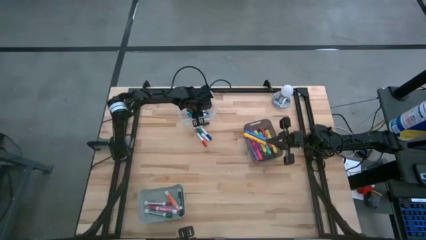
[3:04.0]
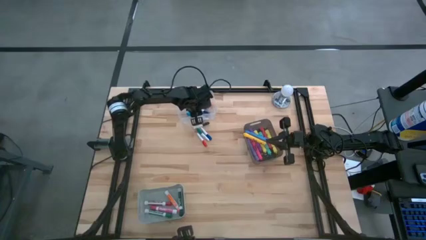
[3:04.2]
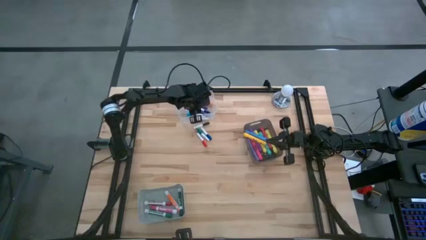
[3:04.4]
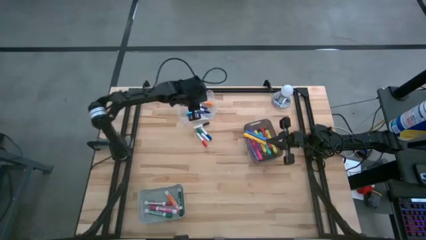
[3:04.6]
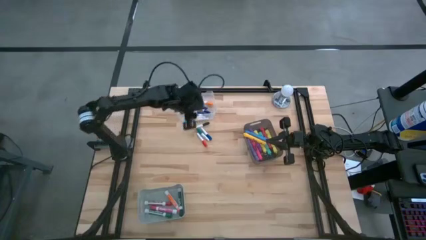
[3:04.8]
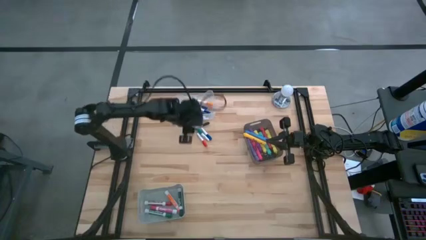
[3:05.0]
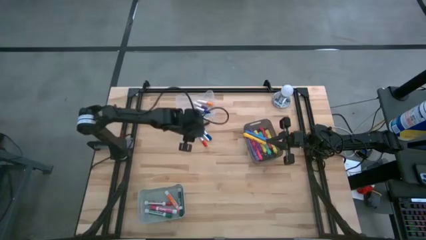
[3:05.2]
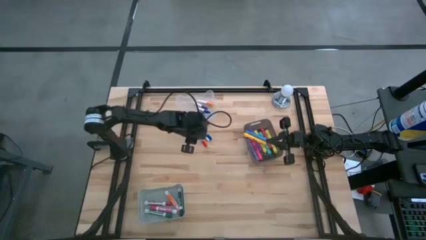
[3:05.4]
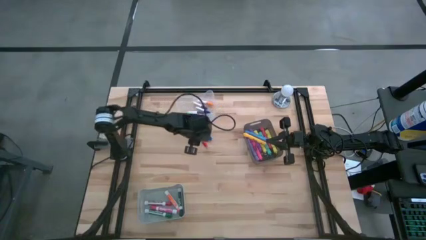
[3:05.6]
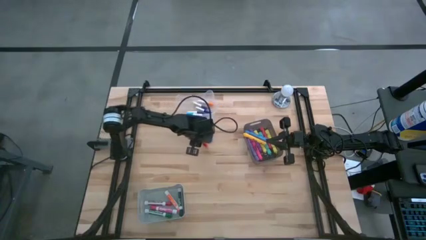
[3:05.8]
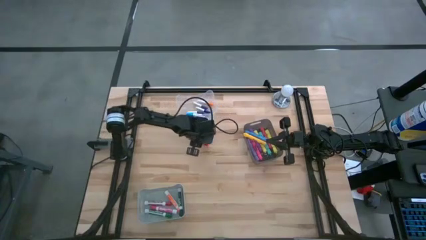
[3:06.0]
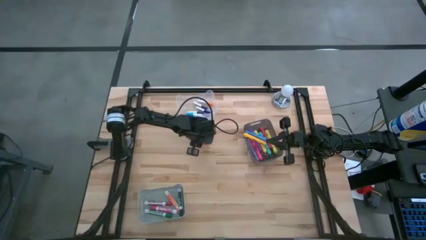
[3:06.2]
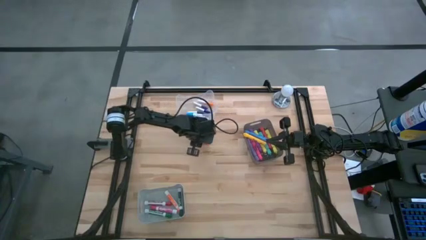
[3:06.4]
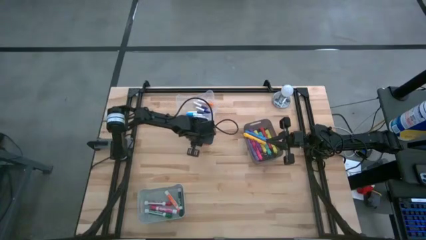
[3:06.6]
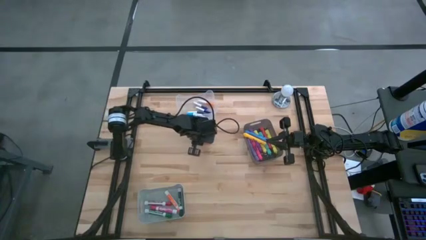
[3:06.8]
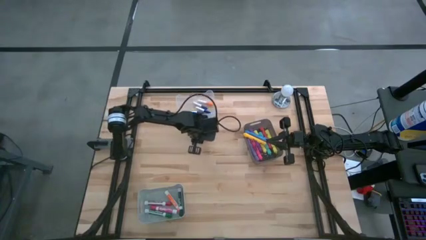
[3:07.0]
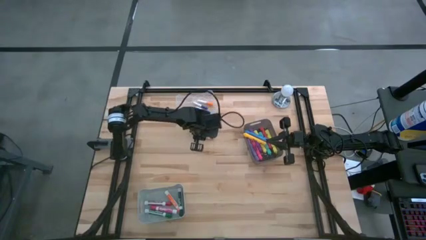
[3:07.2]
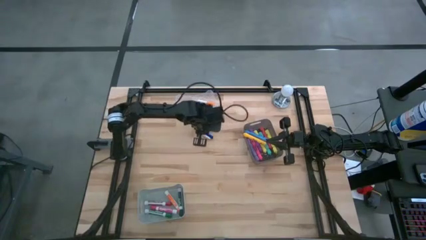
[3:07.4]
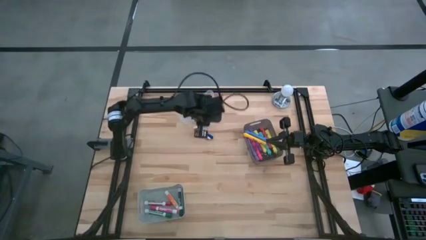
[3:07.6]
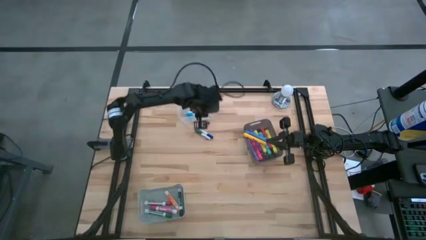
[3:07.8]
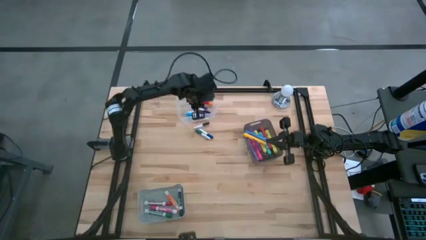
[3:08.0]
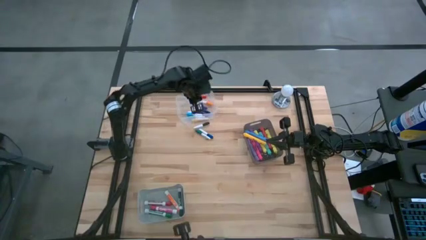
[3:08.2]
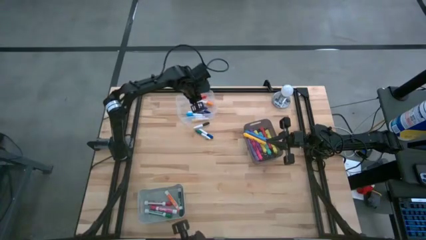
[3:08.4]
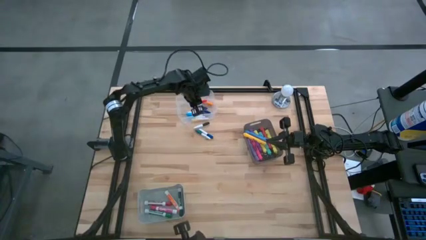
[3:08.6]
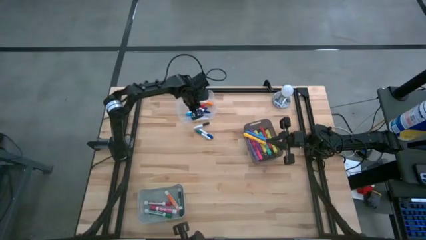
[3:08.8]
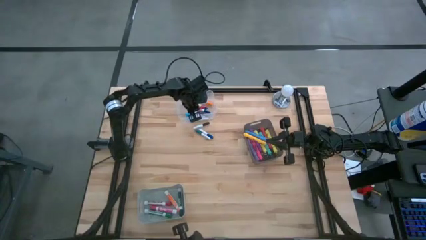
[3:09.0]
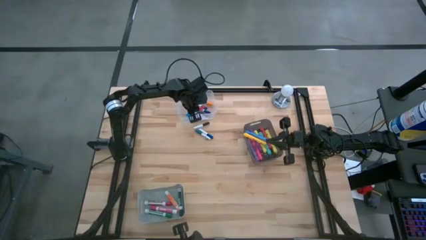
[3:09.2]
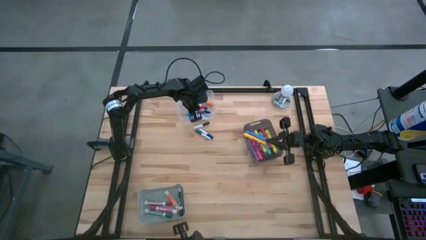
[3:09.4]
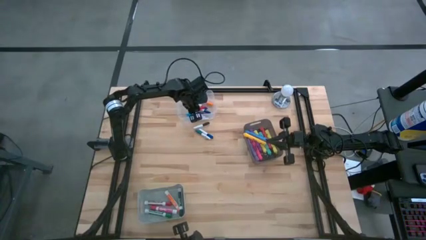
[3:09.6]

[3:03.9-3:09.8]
Task: Pick & Place Markers
Put the white and red highlighter pen into the transparent bin

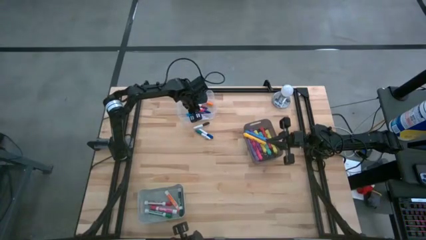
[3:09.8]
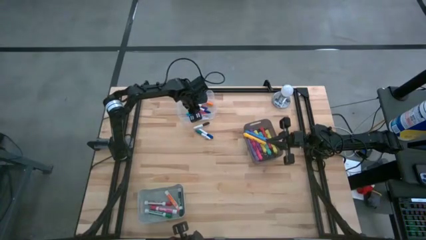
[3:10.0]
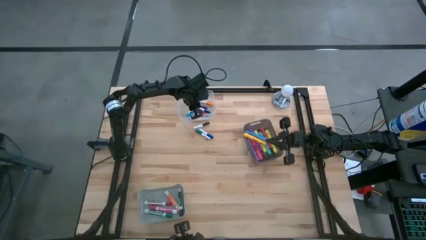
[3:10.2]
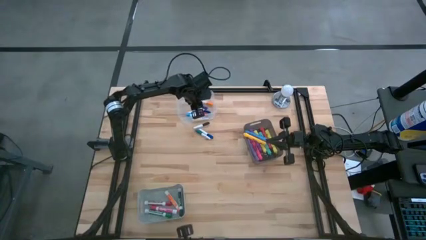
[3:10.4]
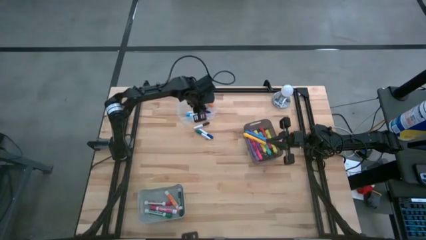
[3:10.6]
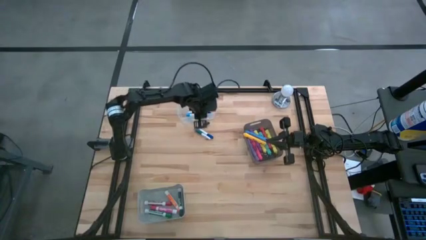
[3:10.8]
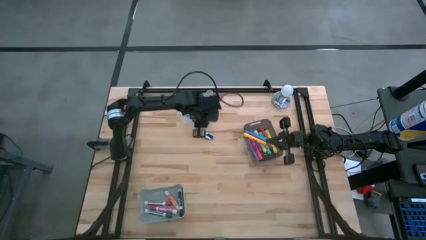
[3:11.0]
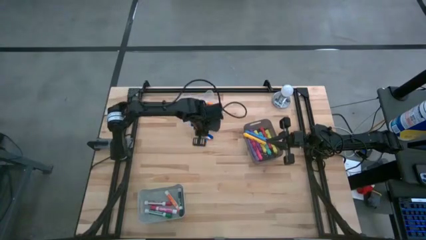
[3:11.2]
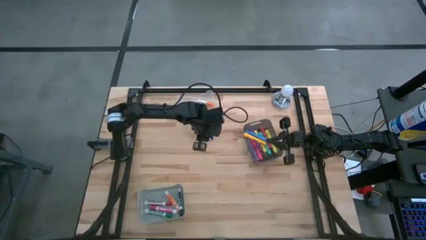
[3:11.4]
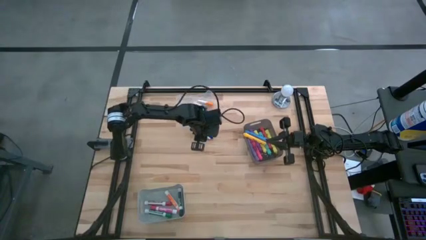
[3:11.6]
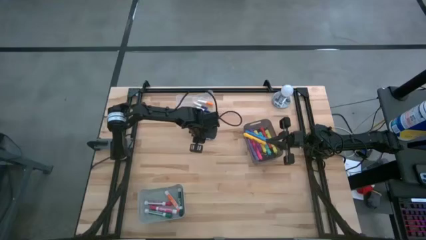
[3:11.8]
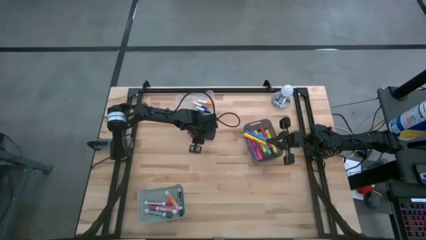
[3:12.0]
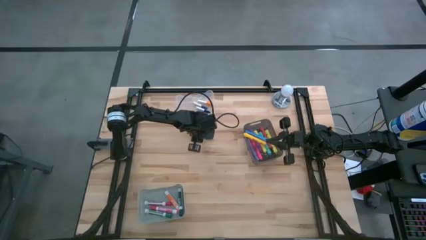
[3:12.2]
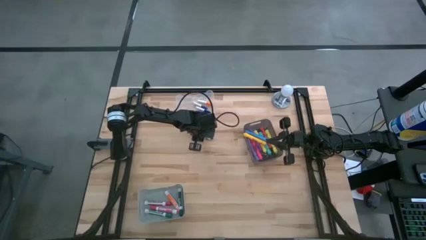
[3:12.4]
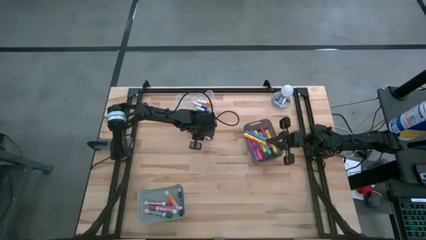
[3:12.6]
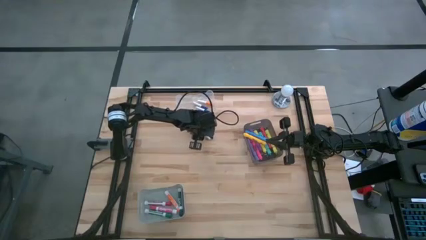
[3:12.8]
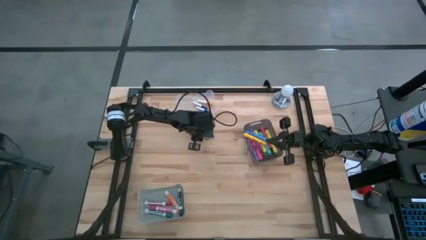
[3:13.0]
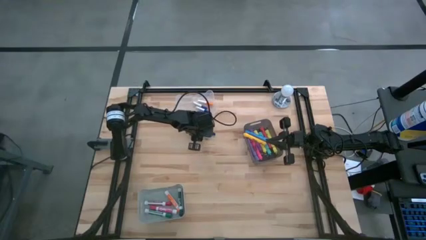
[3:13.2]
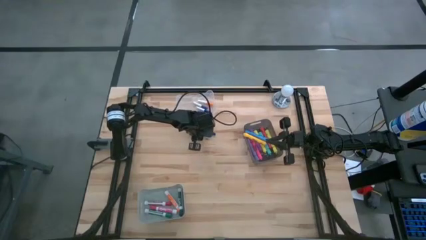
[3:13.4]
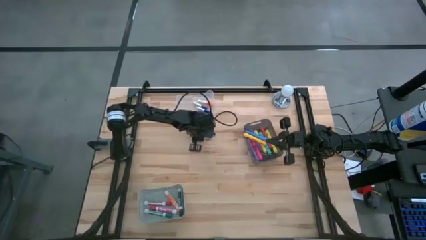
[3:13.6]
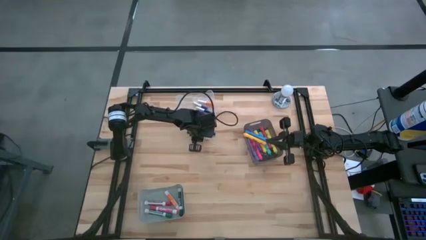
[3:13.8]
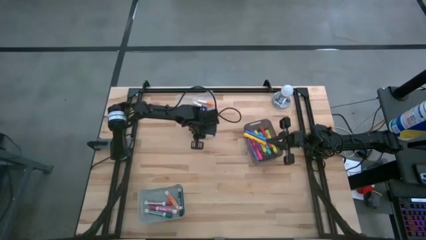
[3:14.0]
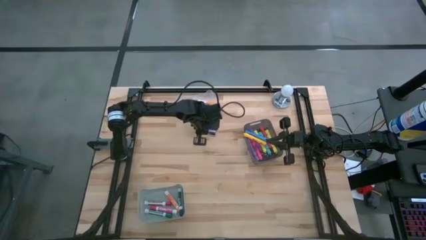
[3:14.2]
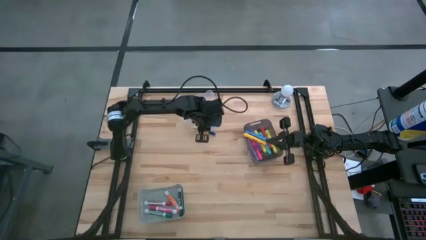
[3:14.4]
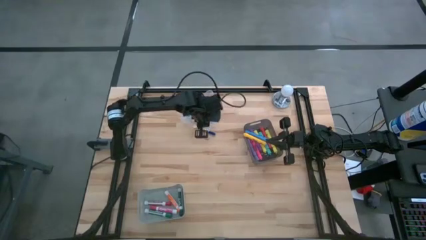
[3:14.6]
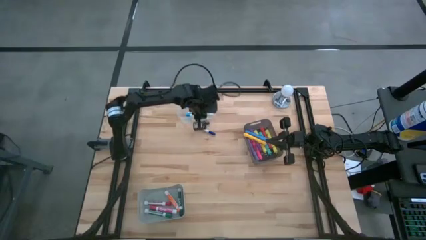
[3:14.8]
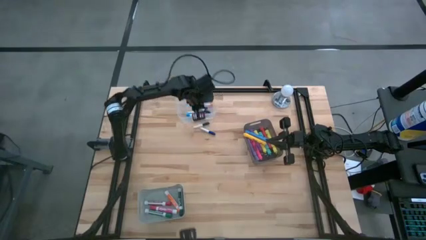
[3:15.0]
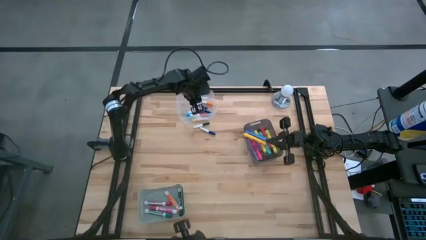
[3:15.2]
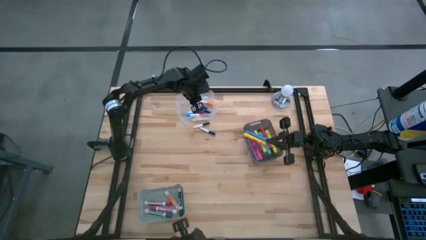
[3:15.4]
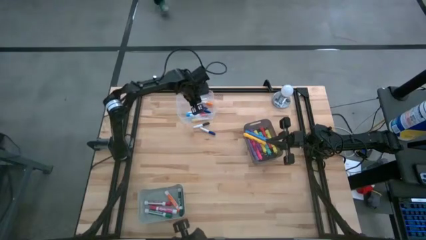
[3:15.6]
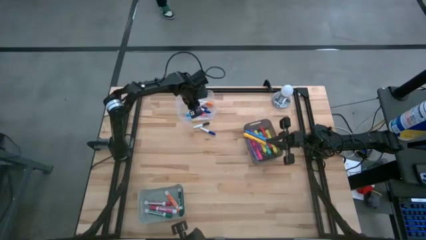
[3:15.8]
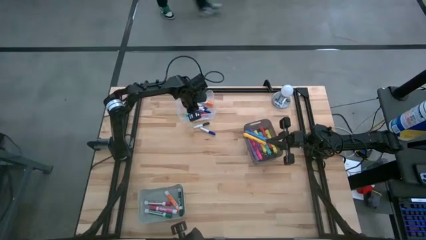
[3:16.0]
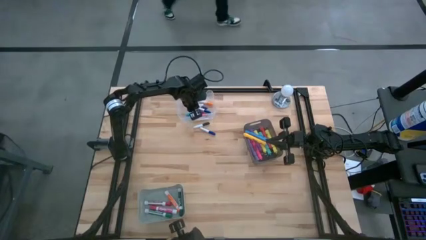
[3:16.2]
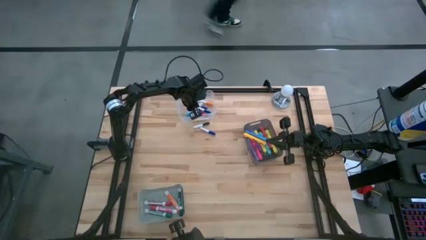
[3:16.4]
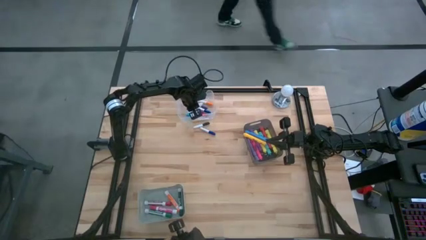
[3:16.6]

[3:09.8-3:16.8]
Put the white and green highlighter pen into the transparent bin

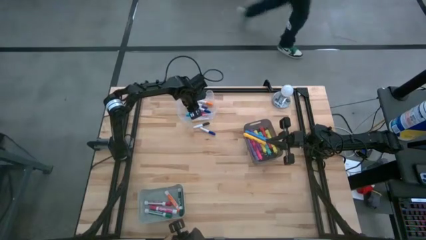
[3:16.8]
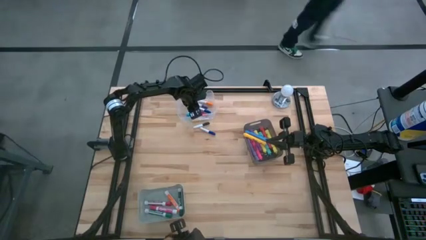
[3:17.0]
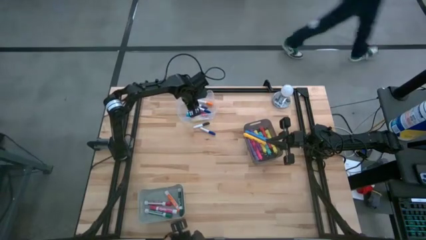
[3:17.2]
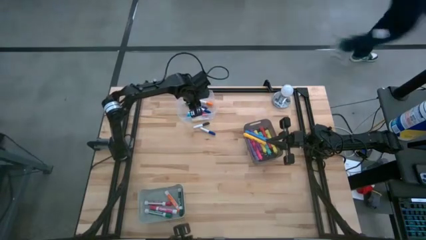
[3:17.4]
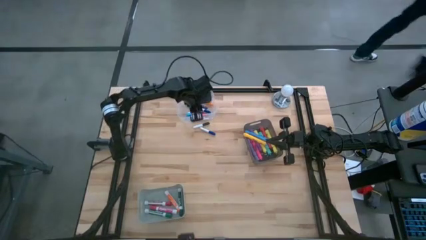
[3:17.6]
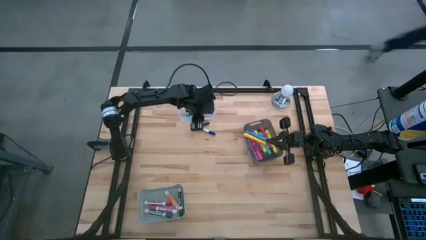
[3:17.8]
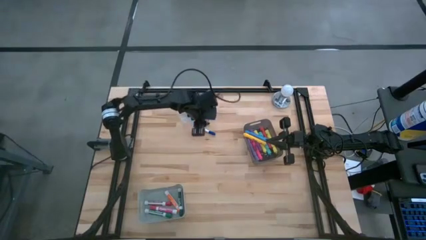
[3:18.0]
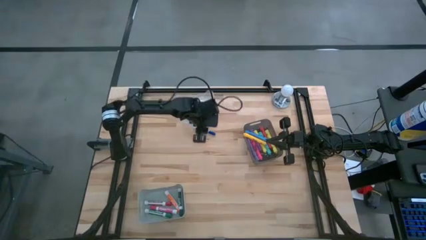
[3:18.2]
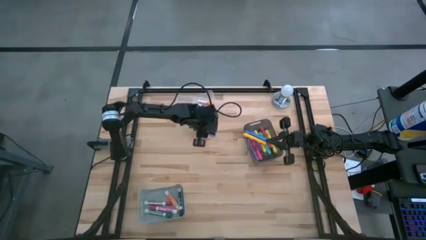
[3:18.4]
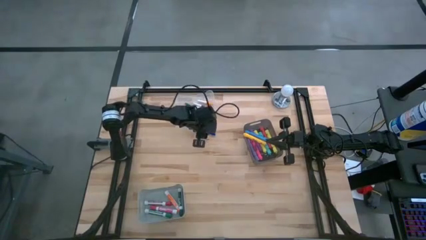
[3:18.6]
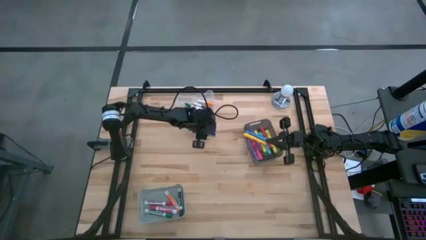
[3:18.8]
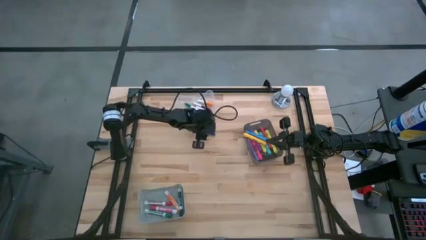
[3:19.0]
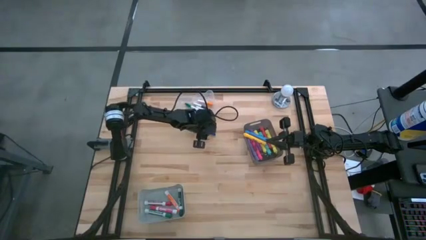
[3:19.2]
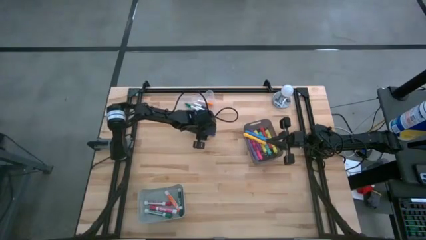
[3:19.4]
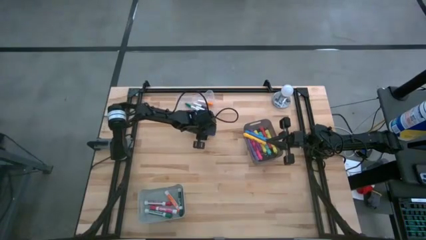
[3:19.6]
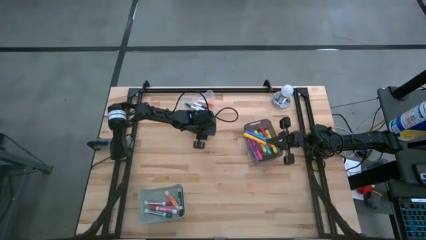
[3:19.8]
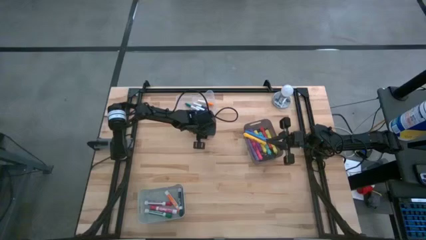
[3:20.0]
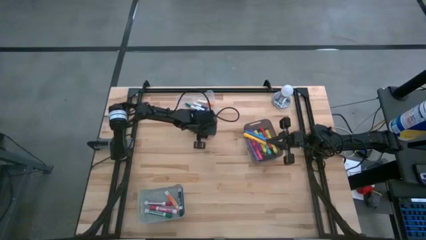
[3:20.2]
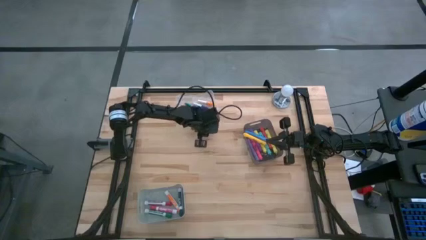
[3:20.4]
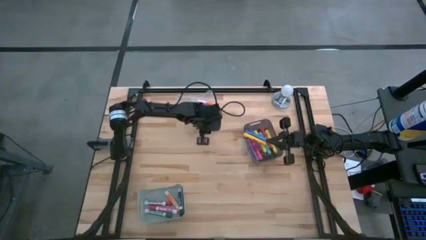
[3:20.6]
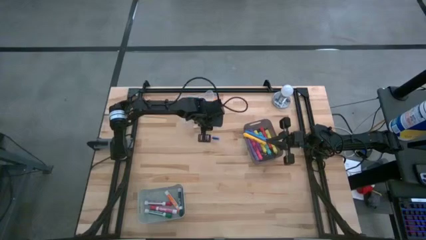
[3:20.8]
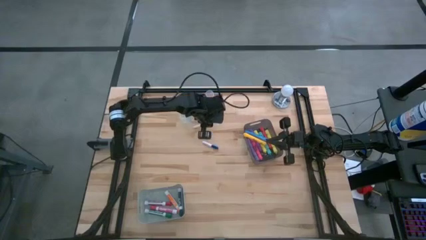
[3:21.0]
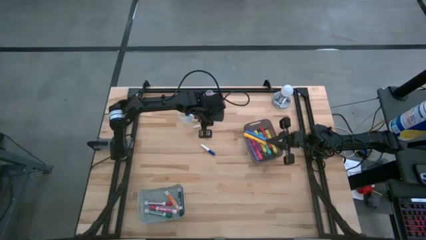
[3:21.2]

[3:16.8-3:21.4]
Put the white and blue highlighter pen into the transparent bin
